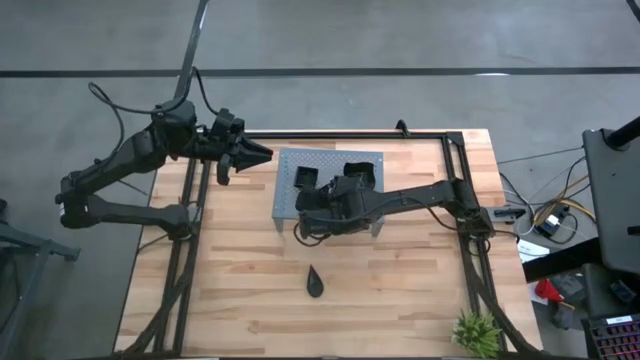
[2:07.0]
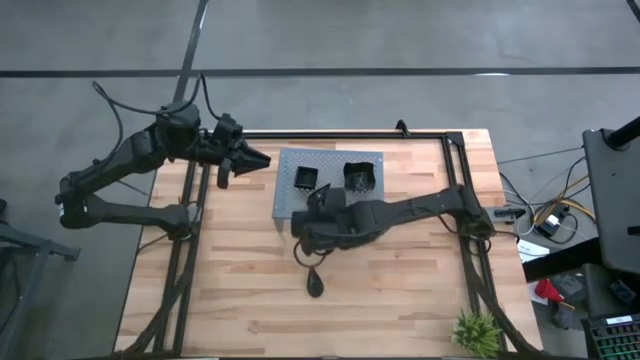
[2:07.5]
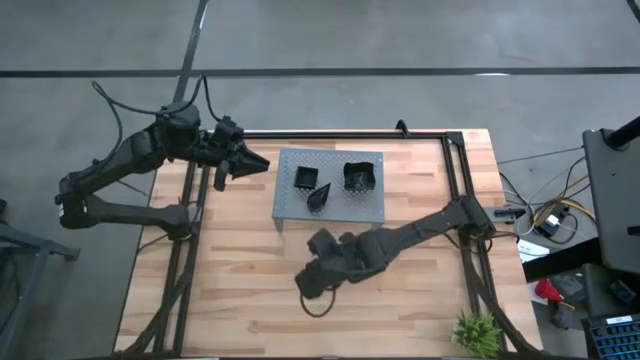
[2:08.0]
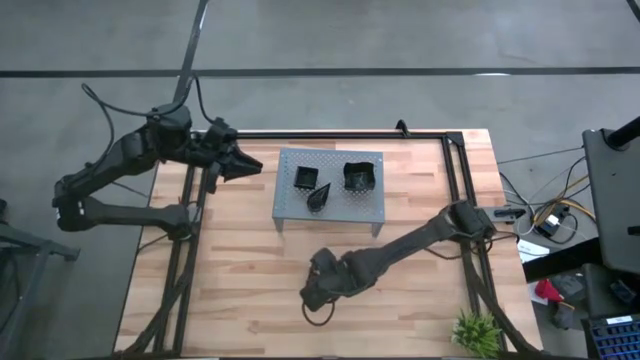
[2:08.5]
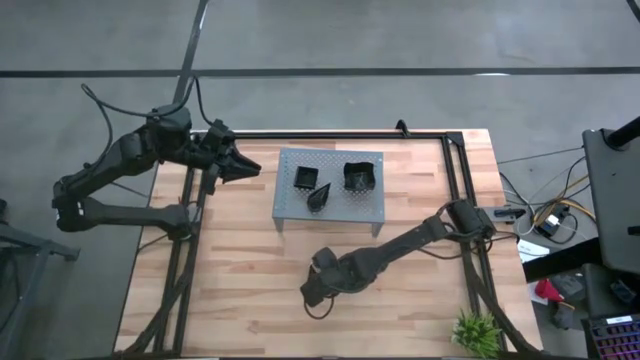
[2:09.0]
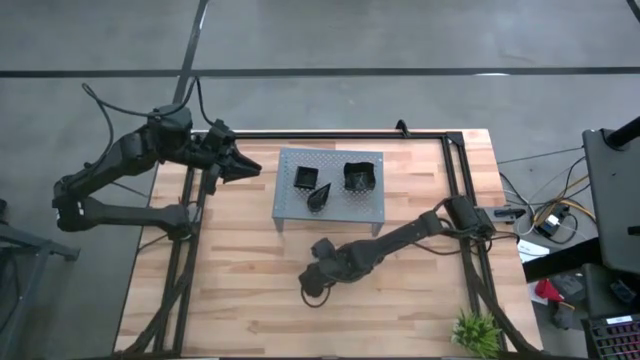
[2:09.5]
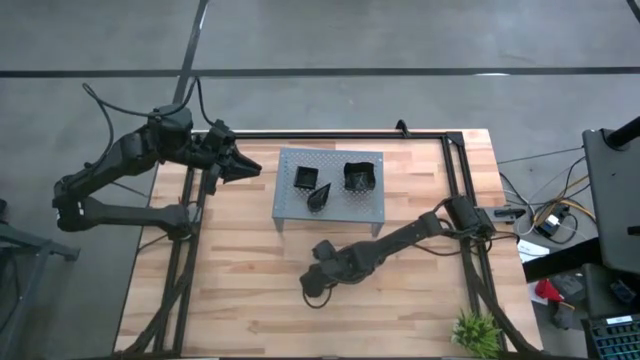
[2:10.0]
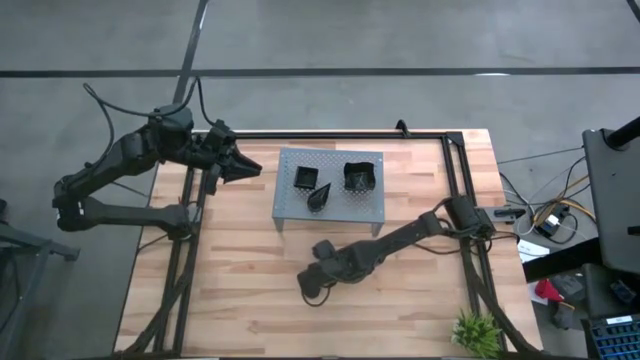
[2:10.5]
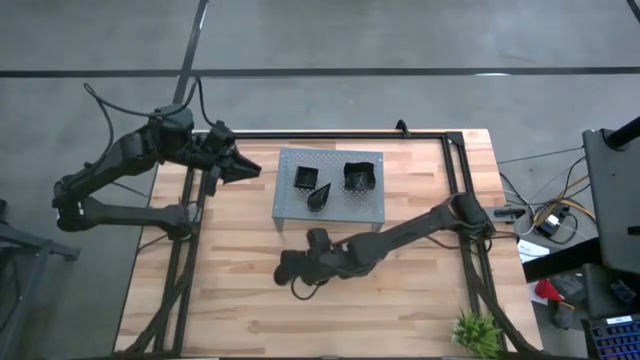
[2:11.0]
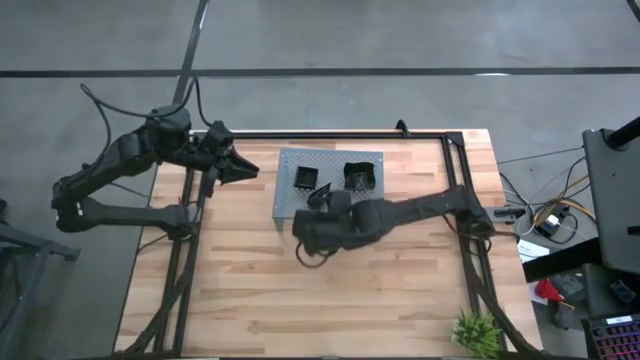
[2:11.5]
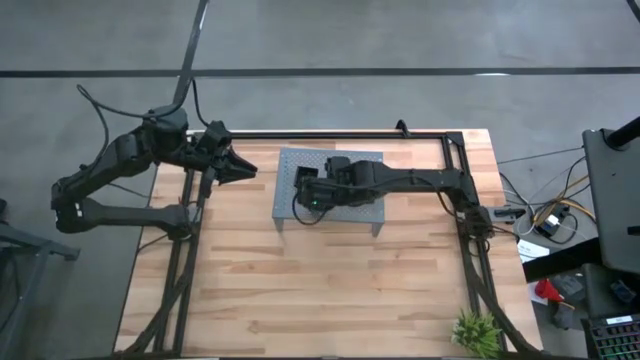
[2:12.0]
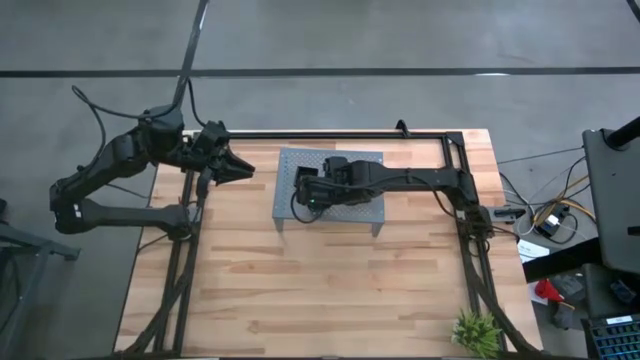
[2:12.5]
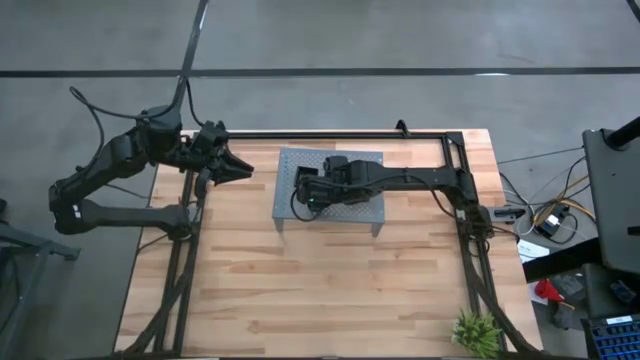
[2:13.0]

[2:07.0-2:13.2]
Task: Pick & Place Mini shaped plates
Stack the black drop shaped plate on top of the other black drop shaped plates on the shelf

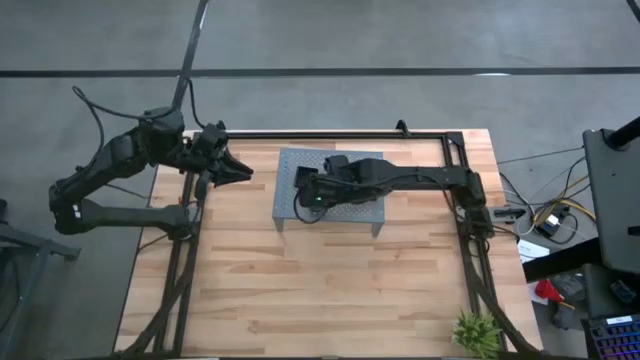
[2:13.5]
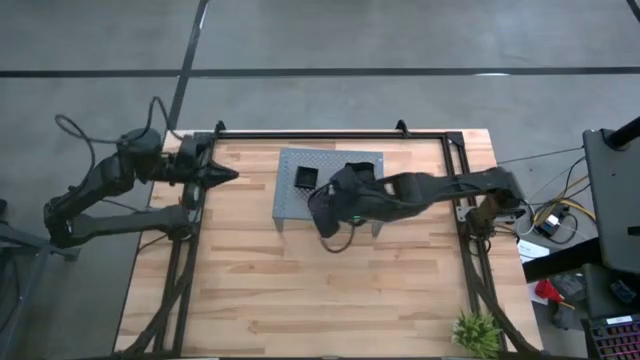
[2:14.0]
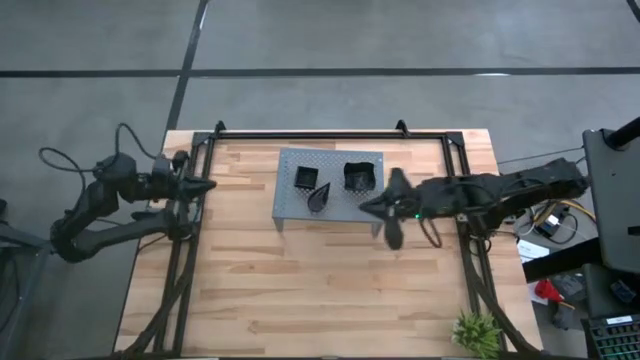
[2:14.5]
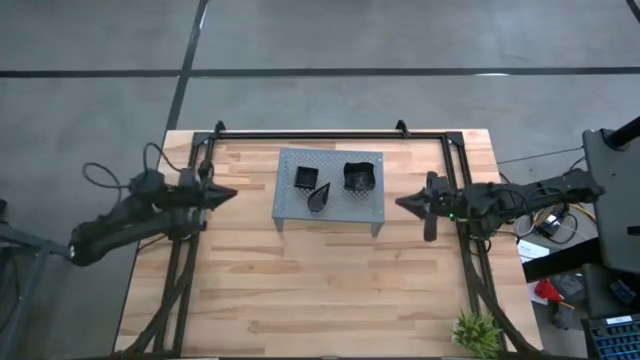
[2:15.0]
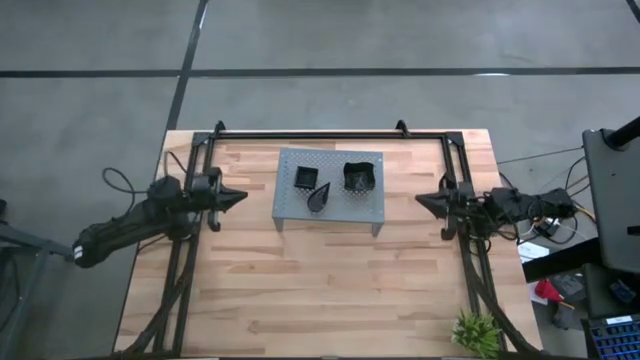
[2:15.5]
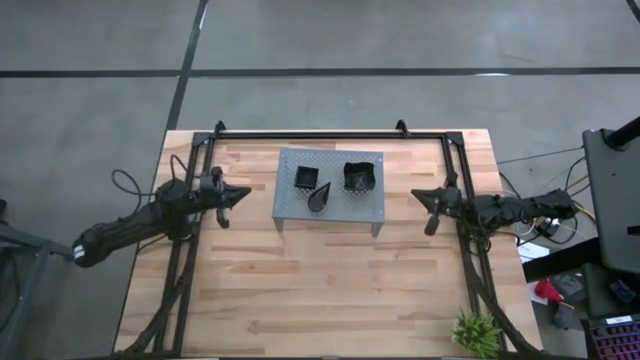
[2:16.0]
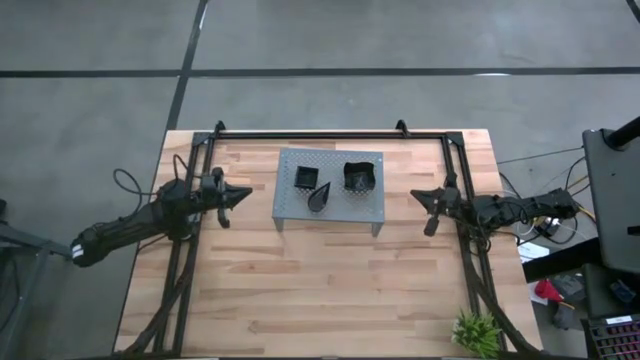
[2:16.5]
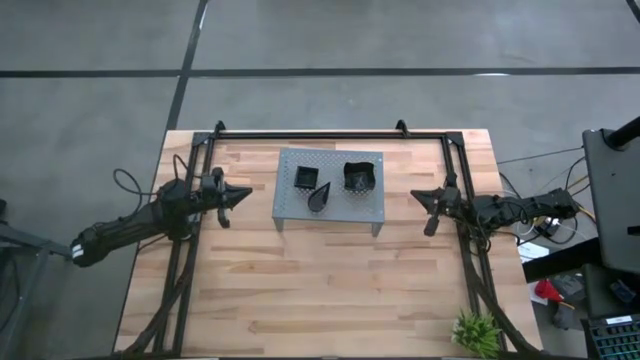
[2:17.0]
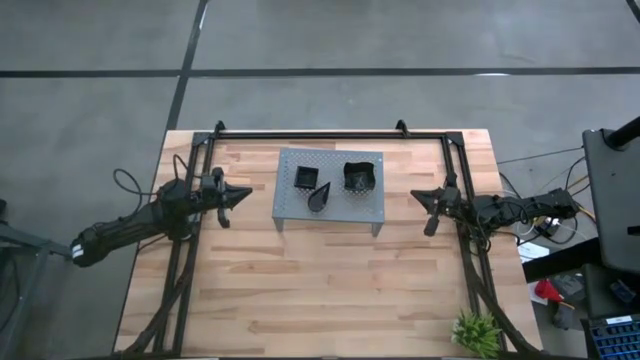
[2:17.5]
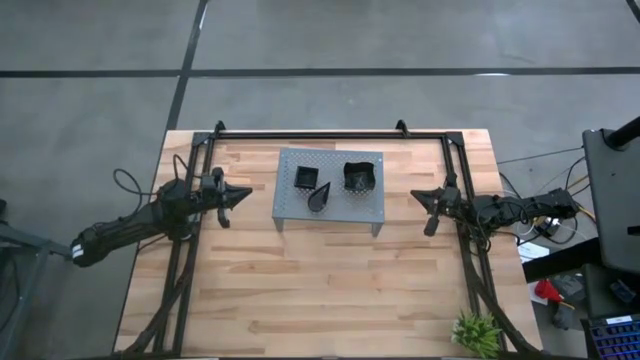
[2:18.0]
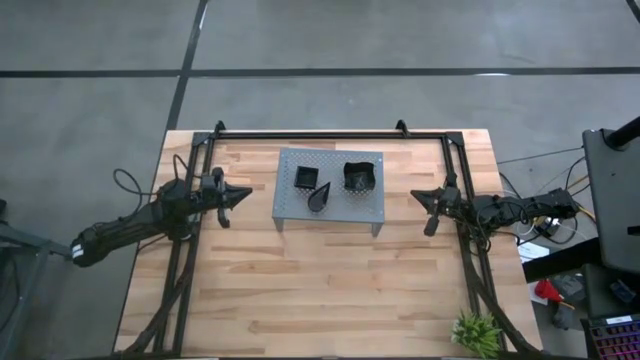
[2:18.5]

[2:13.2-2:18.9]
Return to Home Position

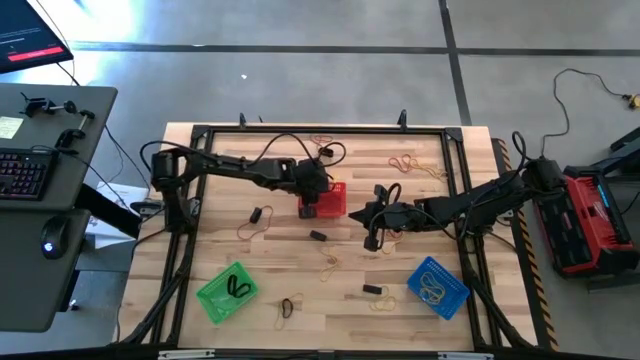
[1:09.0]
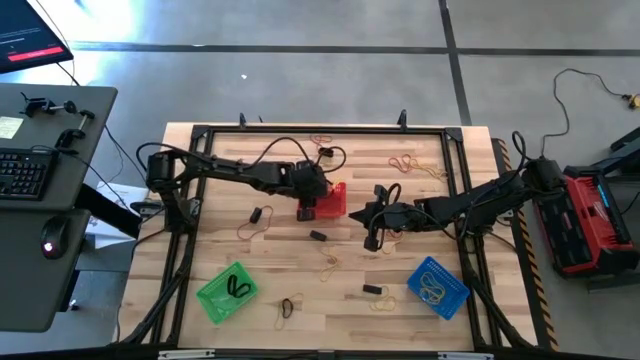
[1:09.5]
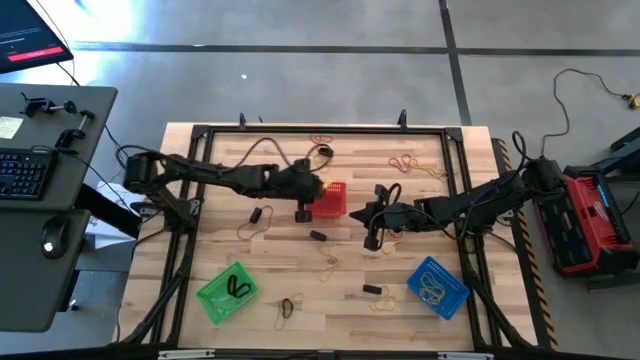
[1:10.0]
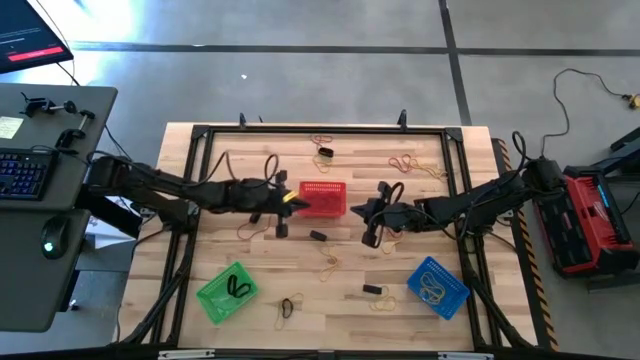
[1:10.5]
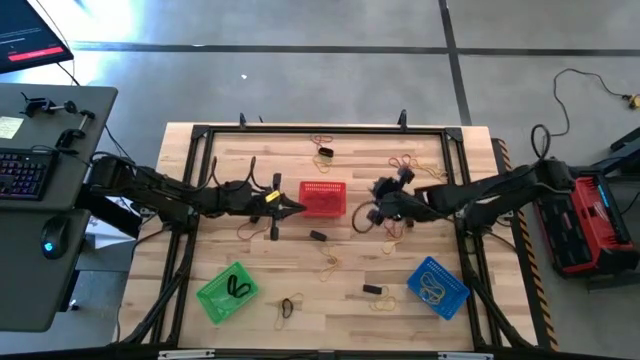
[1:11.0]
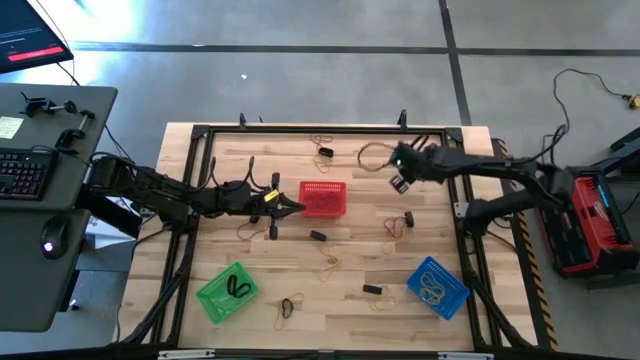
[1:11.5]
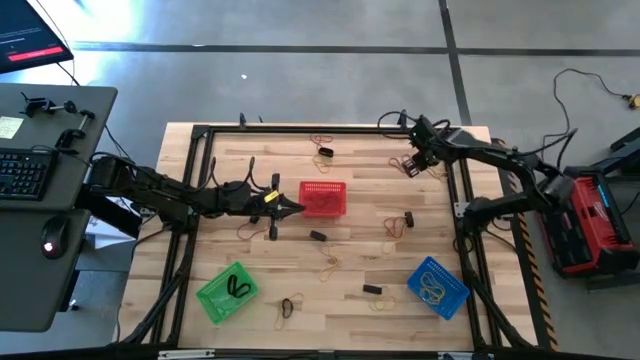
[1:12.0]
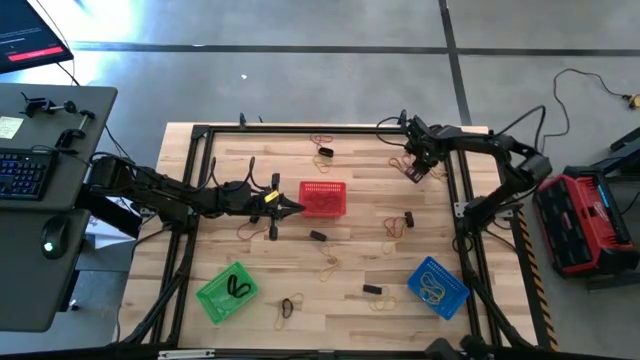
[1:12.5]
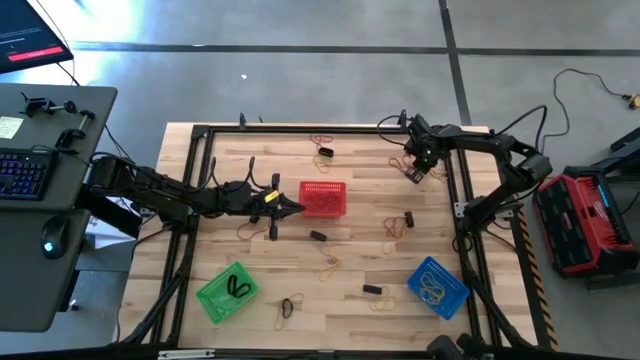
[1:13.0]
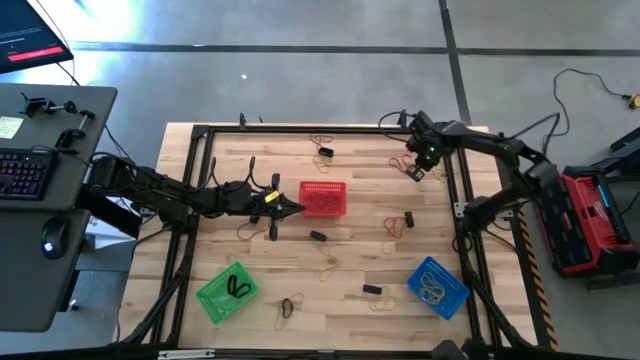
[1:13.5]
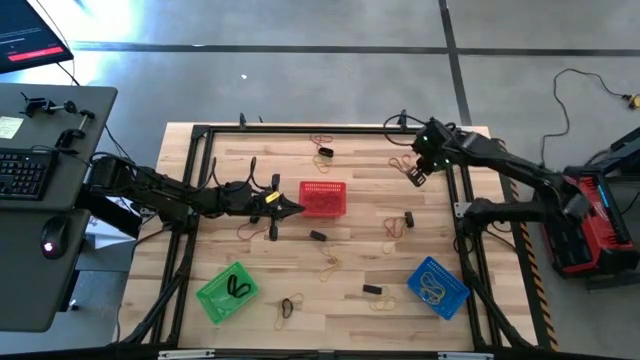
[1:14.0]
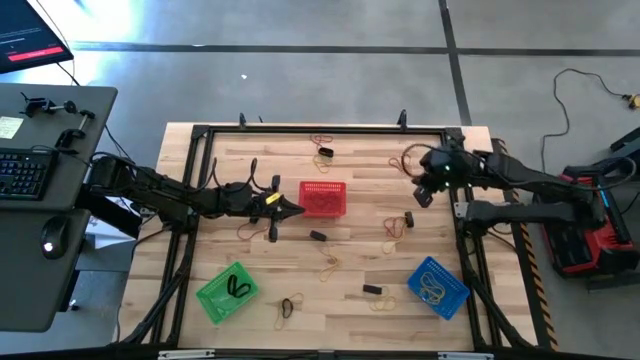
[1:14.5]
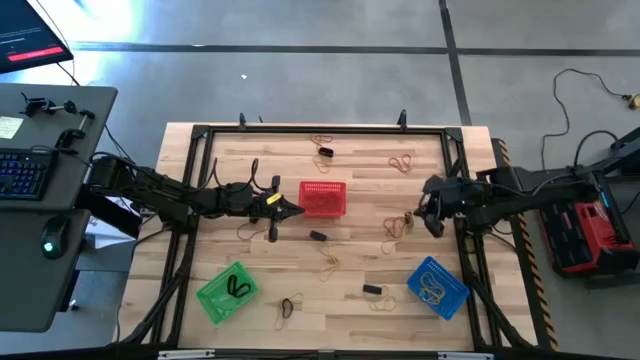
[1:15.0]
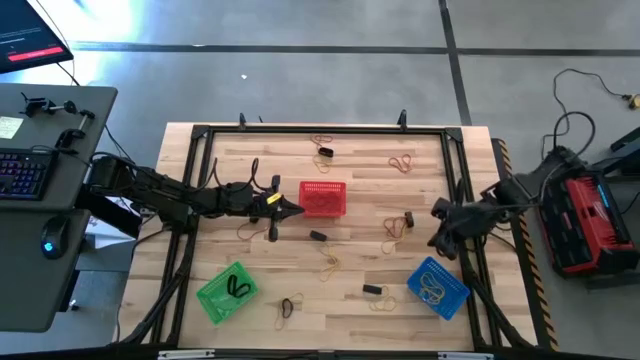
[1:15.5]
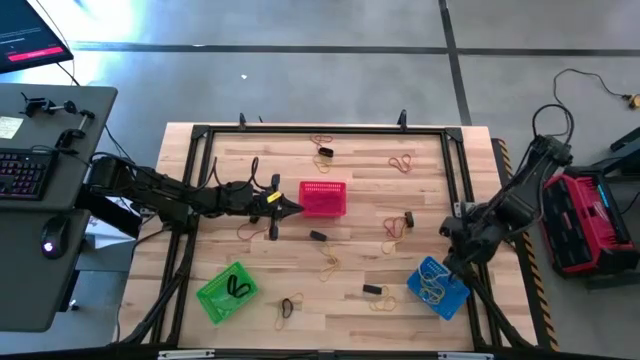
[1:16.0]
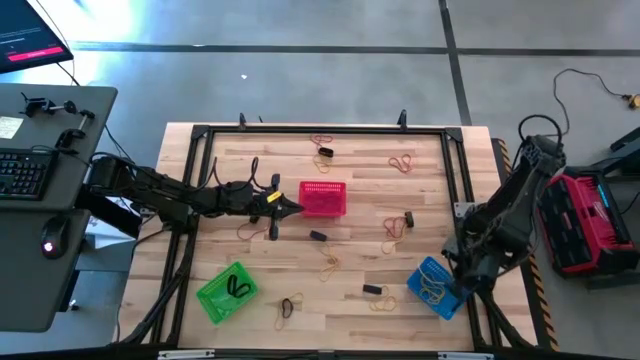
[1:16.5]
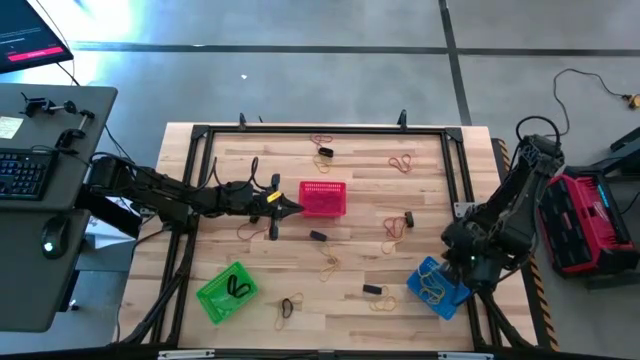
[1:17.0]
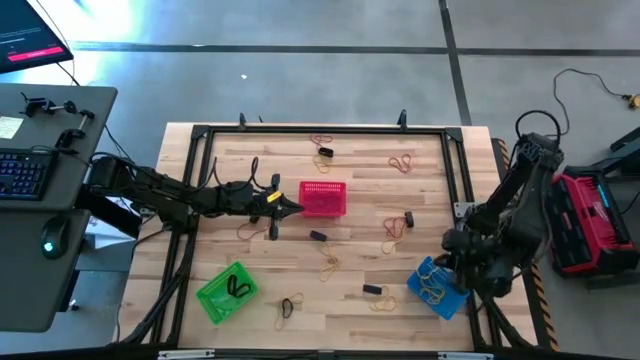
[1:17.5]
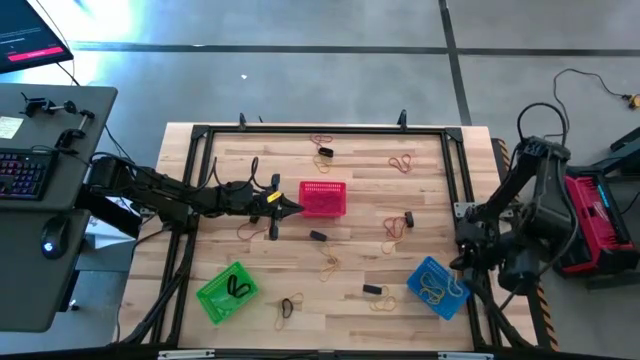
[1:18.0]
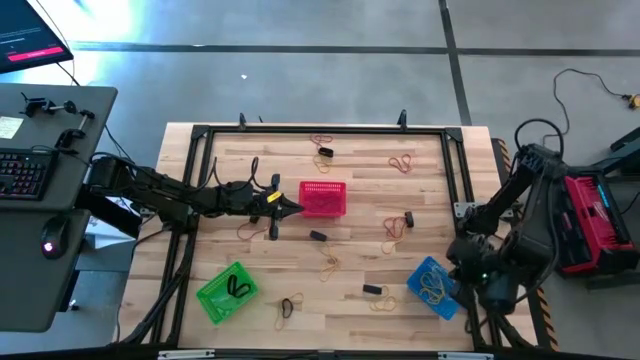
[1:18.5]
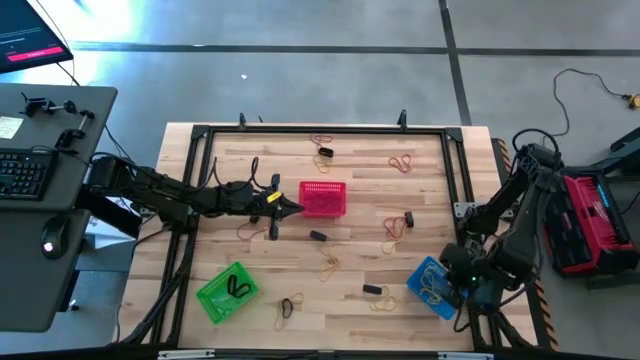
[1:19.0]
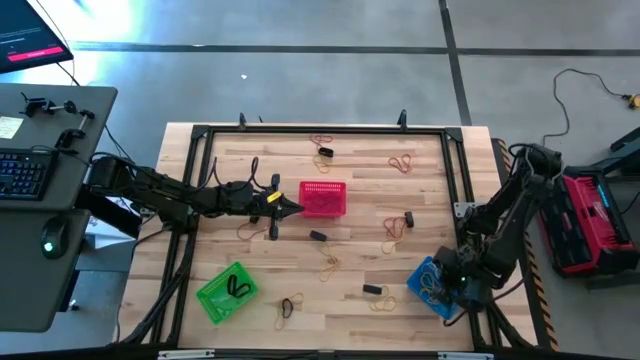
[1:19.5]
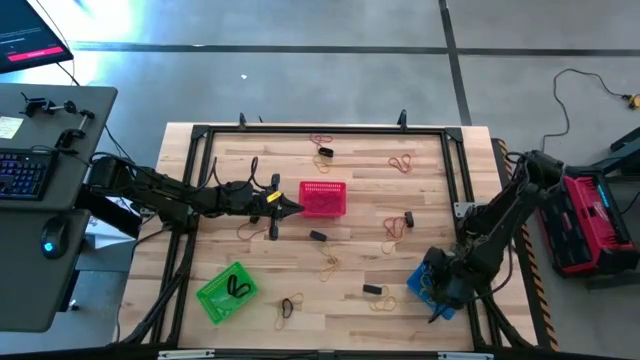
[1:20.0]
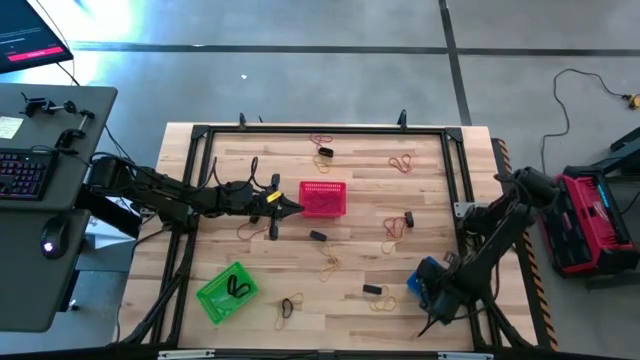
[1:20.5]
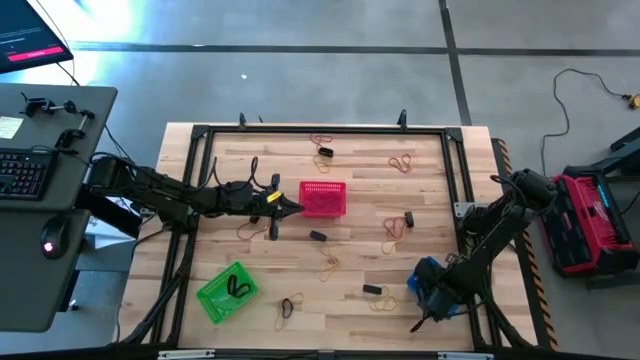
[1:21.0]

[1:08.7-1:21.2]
Task: Sort rubber bands into baskets
Put the yellow rubber band bin into the blue bin
